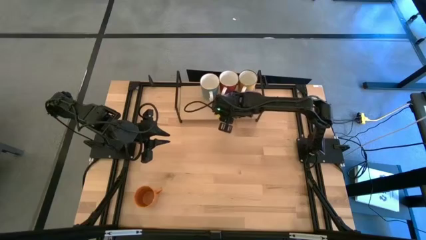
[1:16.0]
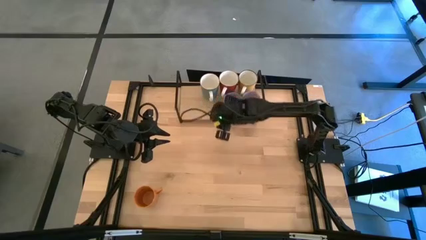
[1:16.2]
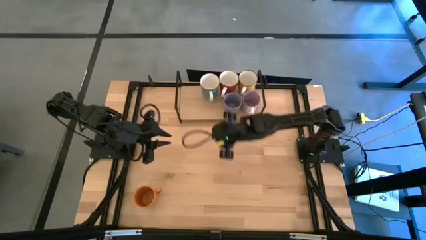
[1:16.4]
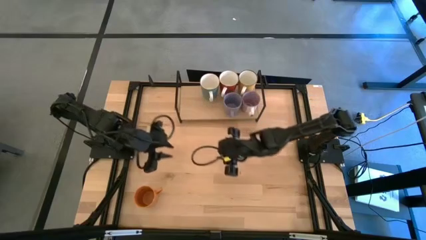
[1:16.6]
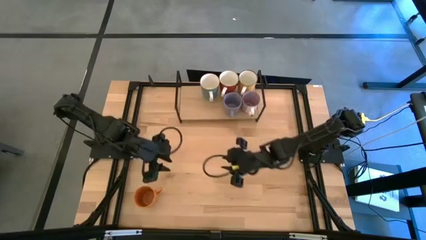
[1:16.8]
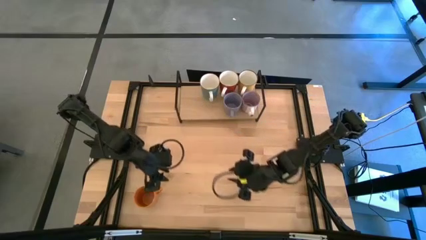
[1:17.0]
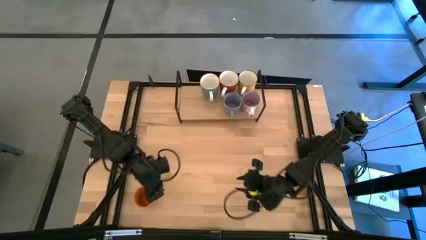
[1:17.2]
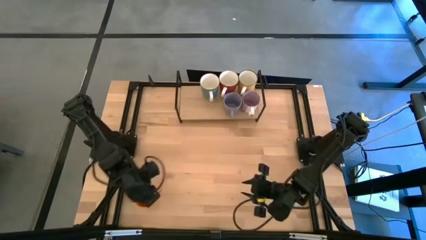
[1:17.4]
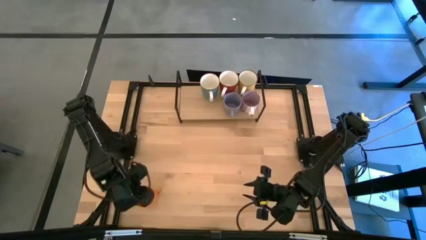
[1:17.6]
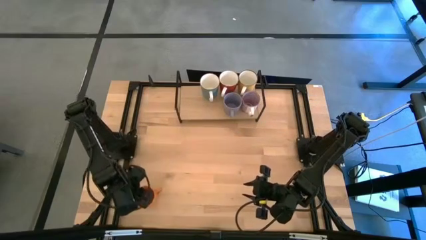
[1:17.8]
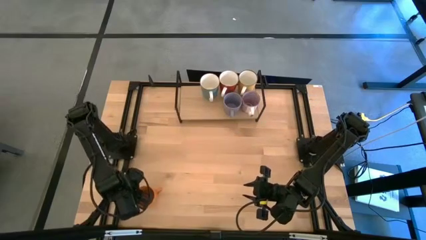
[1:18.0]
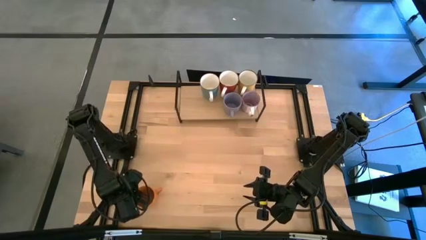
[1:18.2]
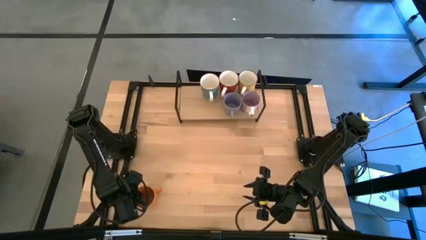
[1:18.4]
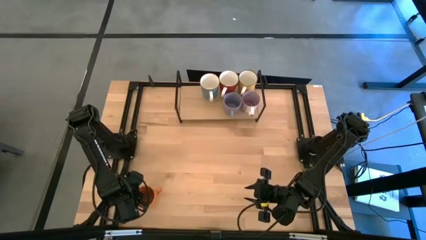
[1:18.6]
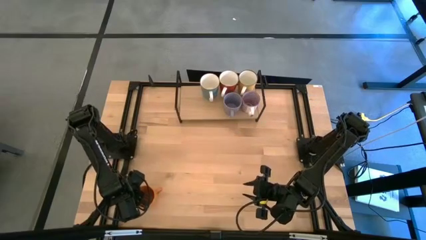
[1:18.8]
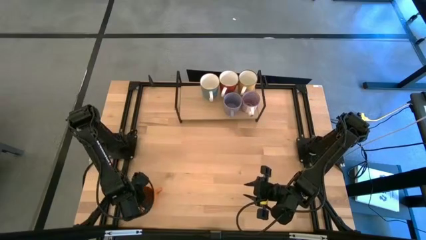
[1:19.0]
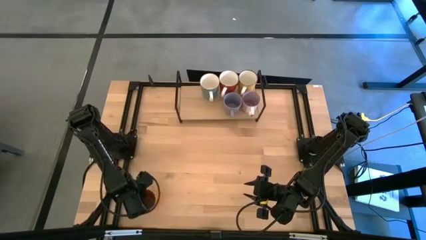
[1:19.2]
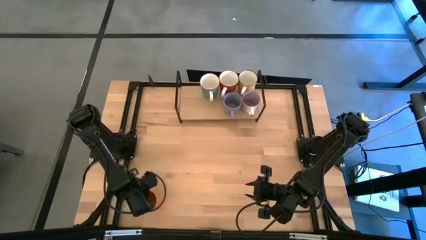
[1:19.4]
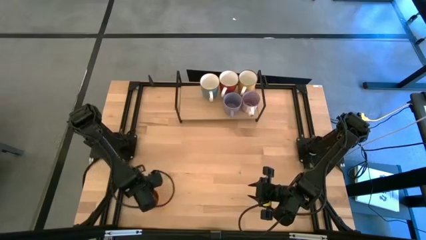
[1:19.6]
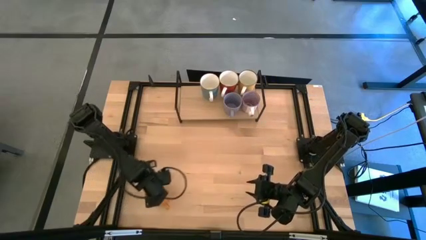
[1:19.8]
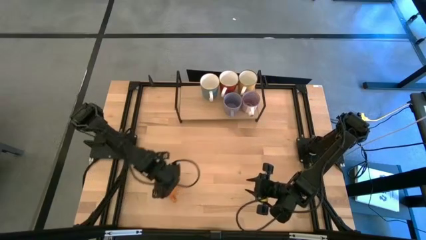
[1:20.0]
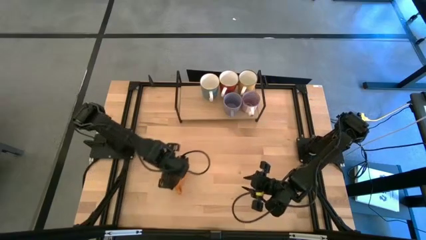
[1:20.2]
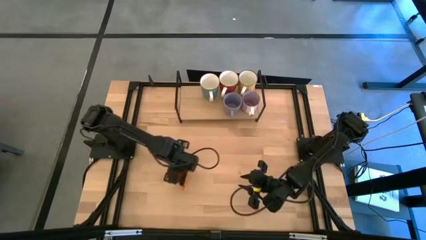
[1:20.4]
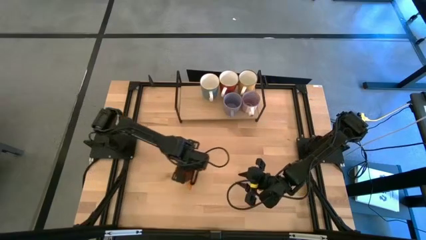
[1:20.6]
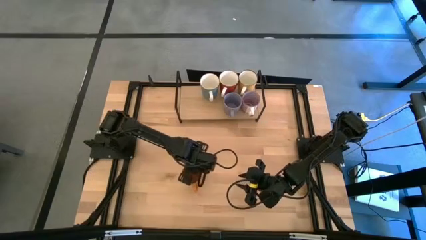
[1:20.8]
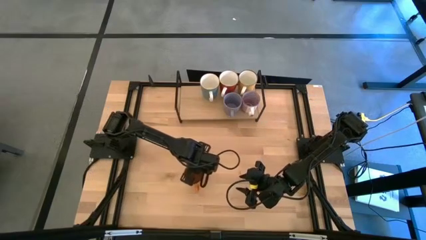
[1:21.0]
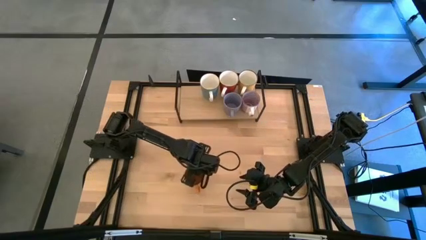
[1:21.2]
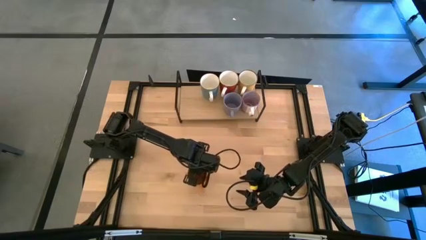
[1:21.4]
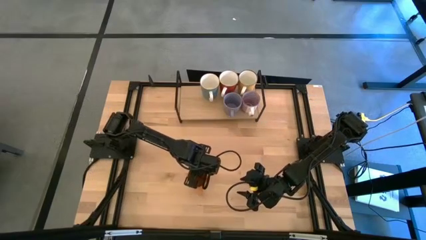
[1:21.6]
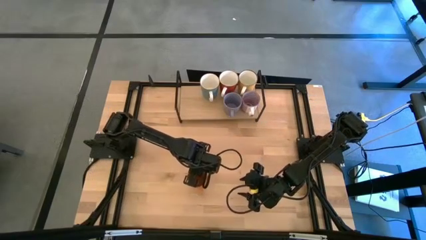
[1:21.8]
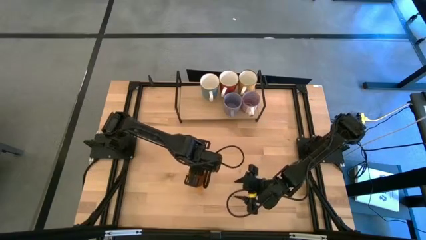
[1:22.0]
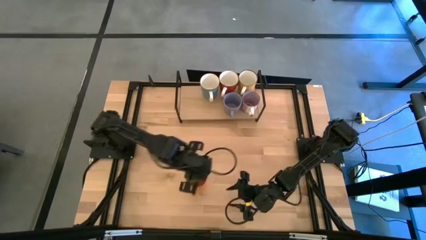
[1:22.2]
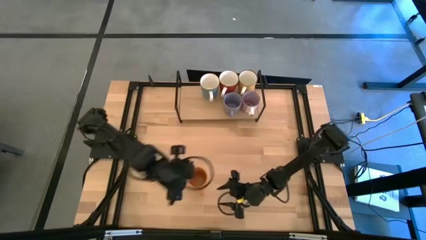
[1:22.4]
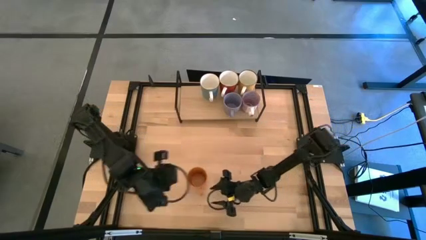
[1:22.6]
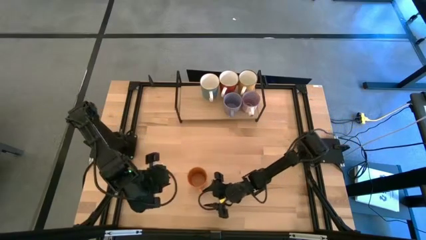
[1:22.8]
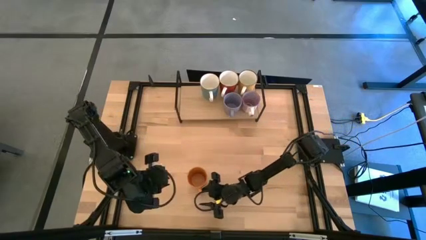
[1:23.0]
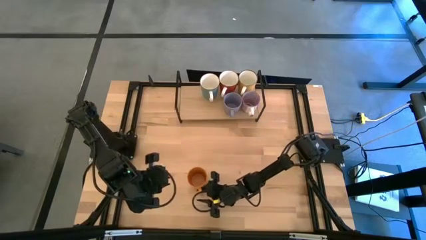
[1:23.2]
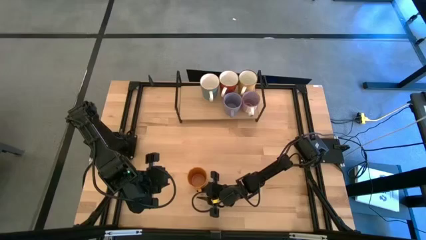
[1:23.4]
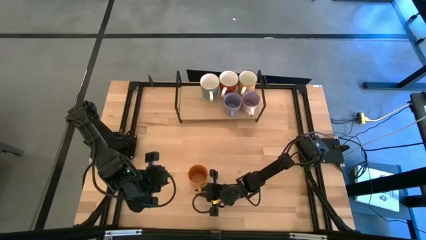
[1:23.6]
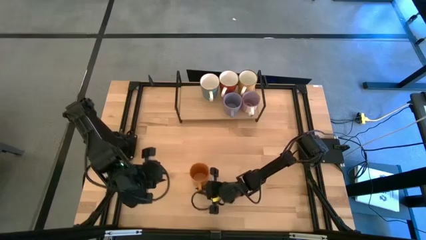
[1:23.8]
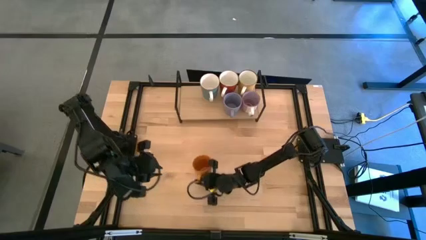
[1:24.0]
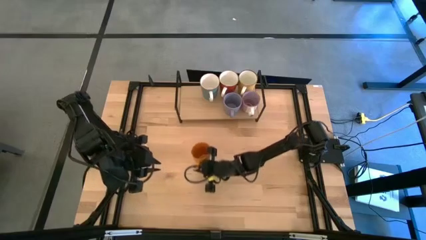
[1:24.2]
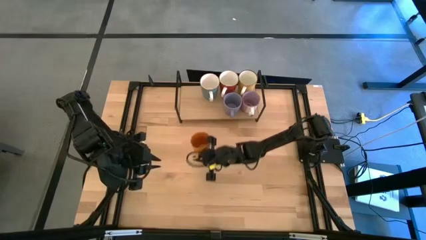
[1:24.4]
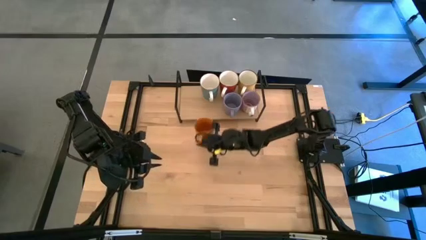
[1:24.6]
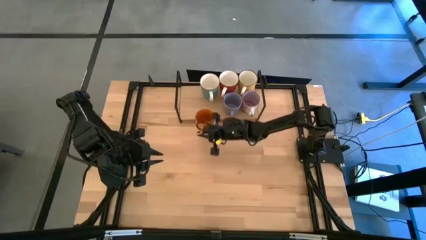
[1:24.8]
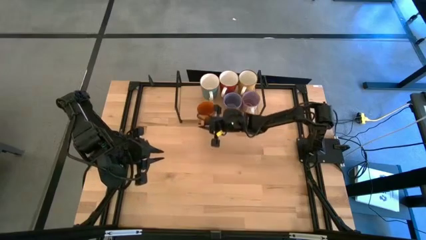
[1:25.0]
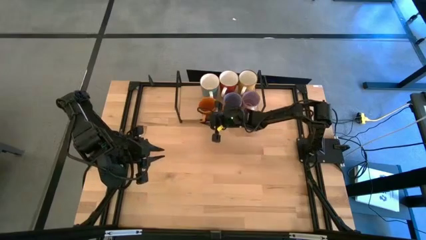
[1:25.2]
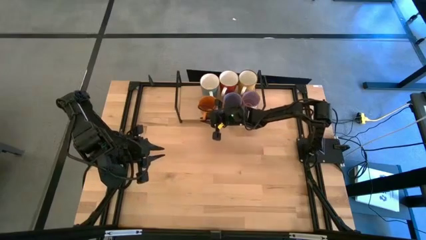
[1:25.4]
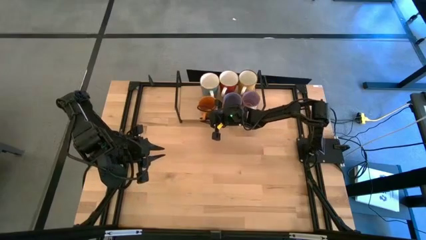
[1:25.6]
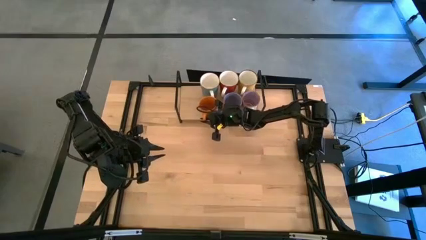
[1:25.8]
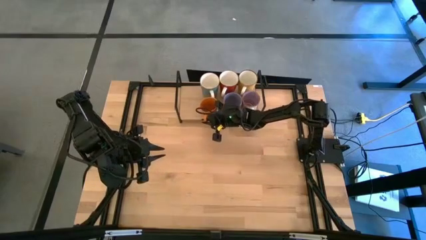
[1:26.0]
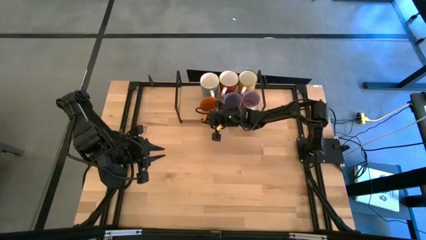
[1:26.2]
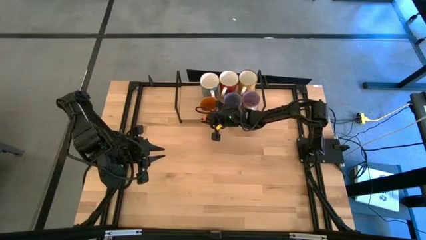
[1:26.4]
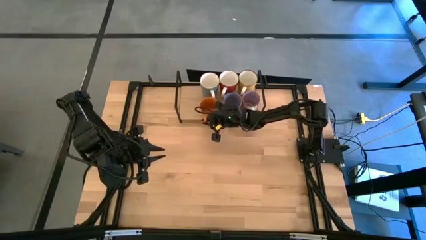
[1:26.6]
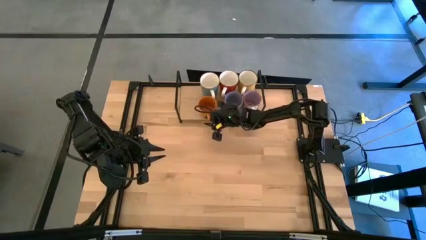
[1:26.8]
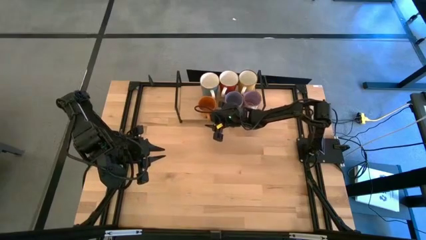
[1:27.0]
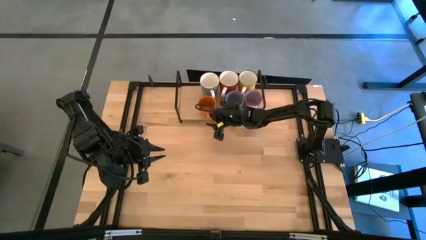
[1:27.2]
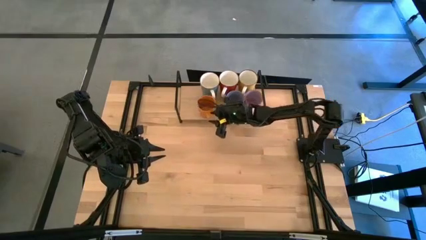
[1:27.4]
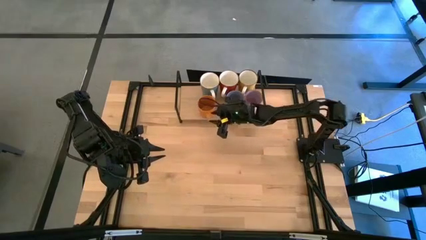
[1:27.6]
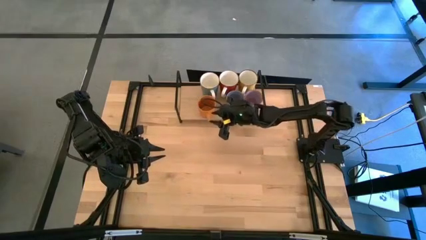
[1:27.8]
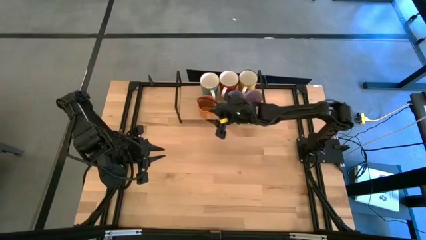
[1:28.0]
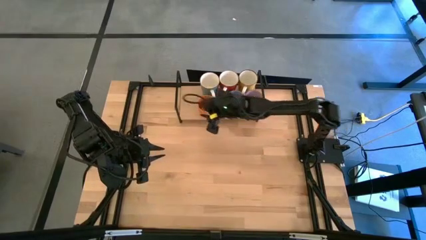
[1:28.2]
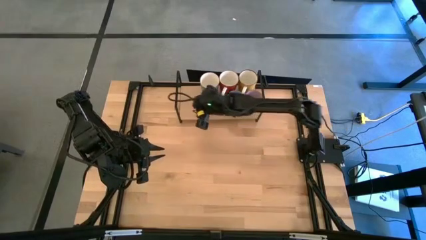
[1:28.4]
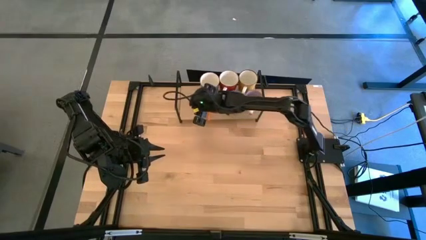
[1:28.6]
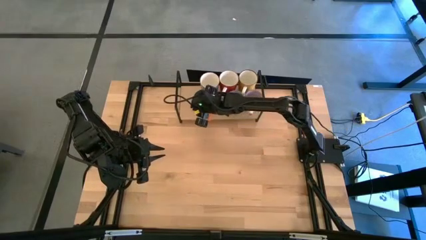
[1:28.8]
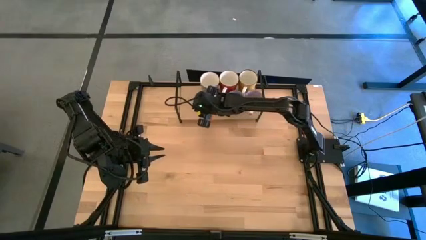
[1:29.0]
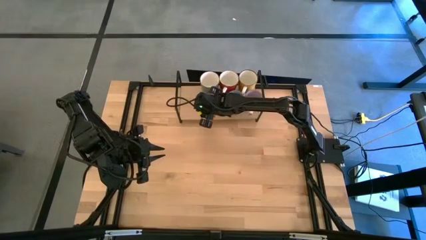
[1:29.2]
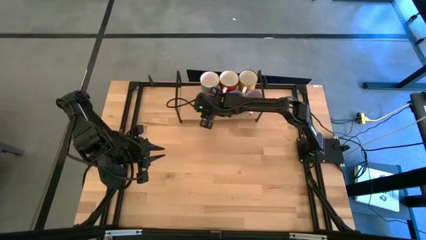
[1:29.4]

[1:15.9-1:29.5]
Task: Place coffee mugs
Put the orange mug on the shelf
